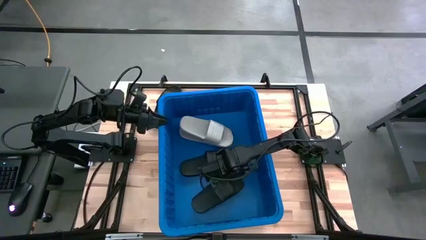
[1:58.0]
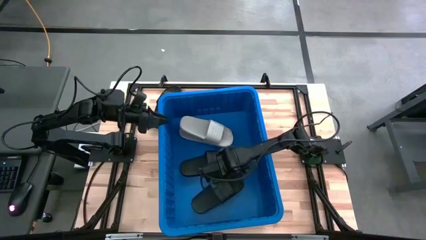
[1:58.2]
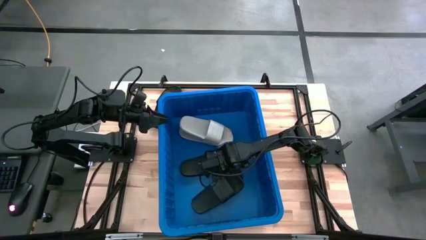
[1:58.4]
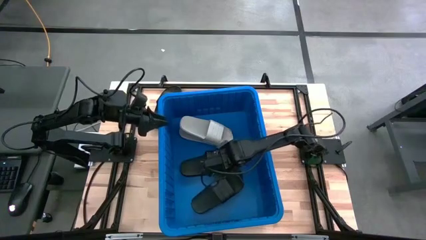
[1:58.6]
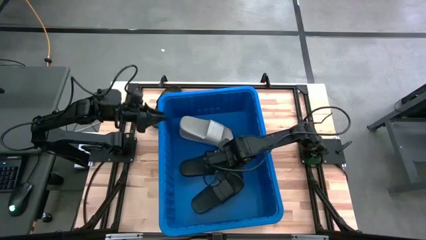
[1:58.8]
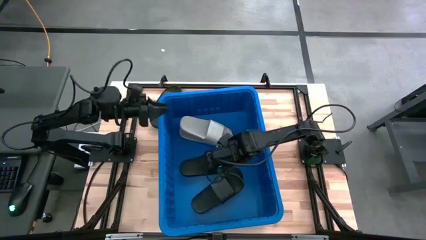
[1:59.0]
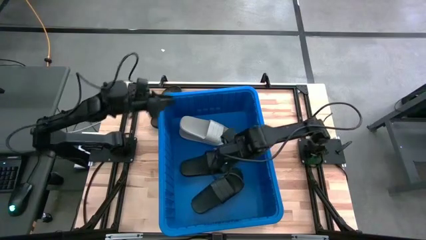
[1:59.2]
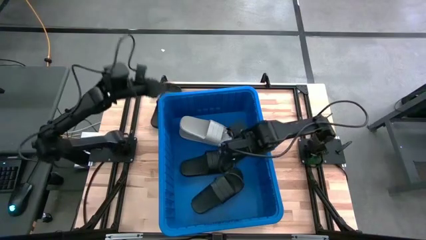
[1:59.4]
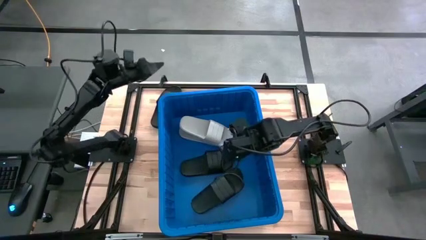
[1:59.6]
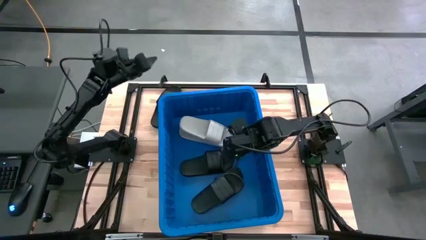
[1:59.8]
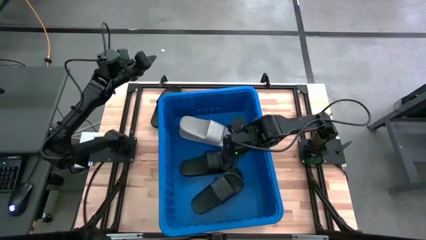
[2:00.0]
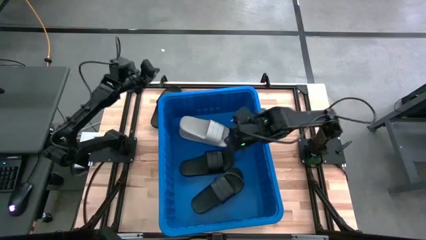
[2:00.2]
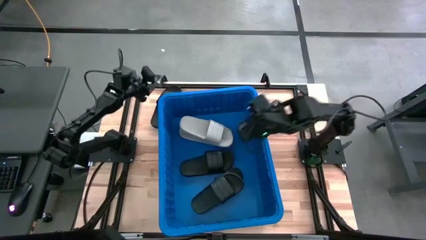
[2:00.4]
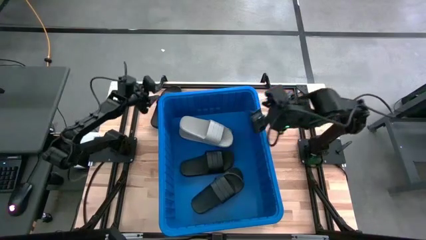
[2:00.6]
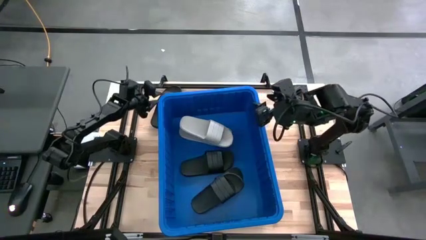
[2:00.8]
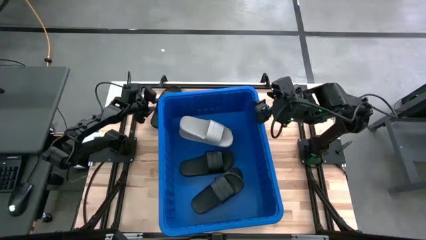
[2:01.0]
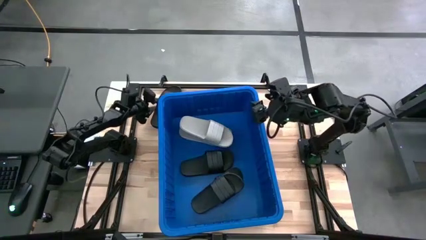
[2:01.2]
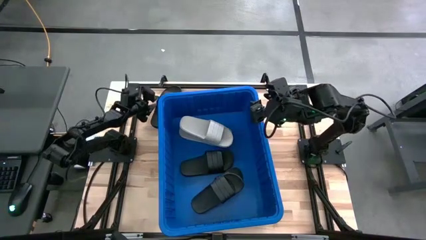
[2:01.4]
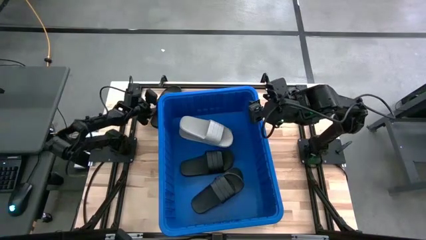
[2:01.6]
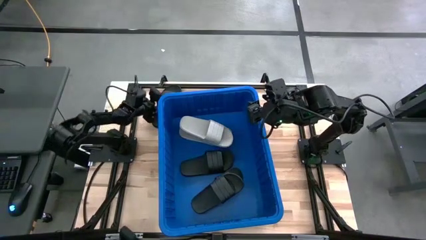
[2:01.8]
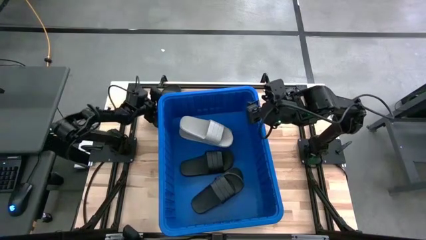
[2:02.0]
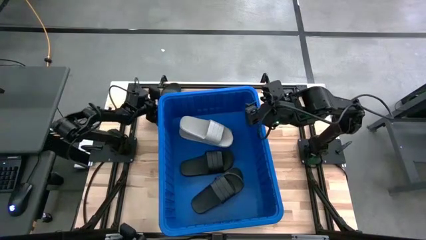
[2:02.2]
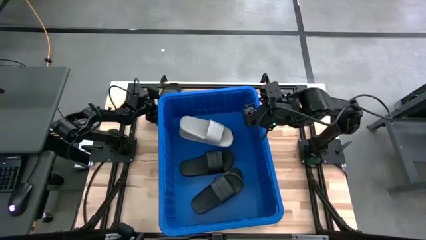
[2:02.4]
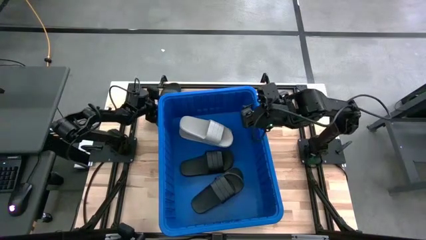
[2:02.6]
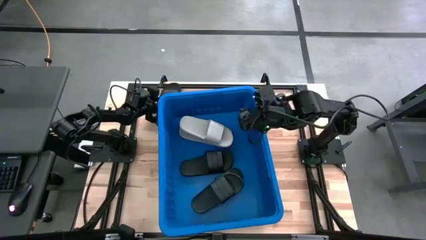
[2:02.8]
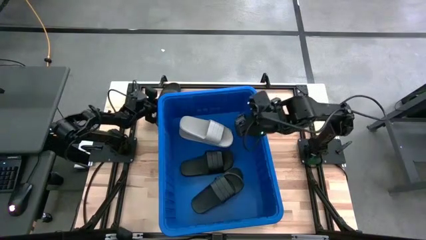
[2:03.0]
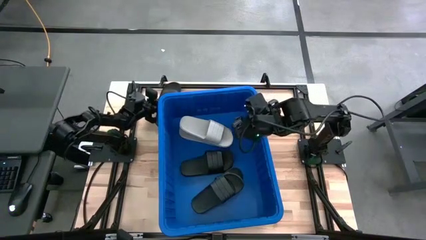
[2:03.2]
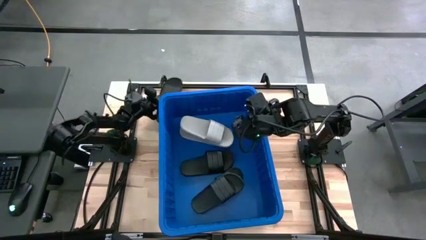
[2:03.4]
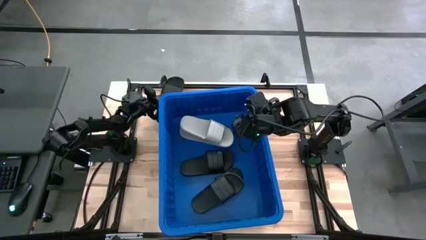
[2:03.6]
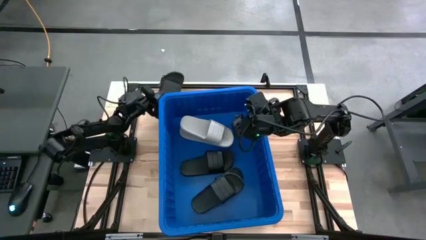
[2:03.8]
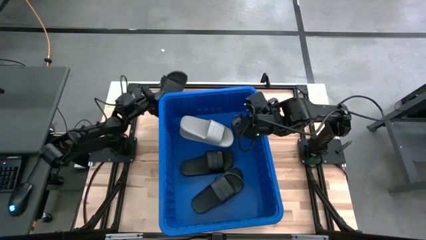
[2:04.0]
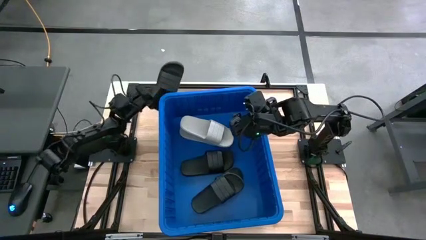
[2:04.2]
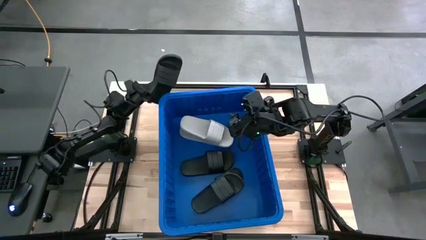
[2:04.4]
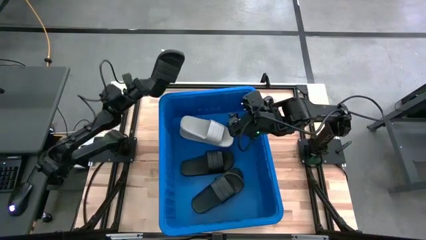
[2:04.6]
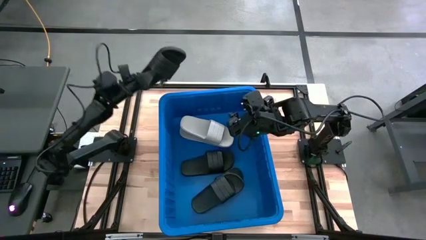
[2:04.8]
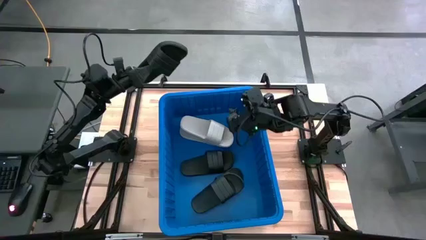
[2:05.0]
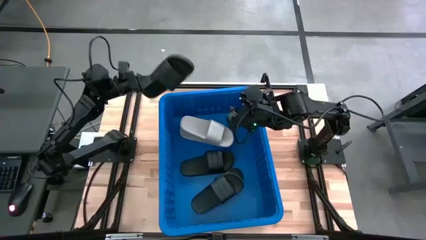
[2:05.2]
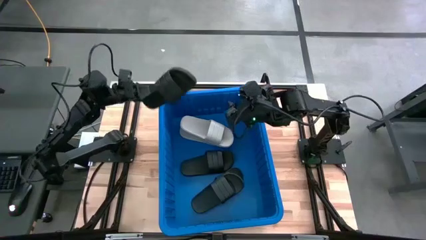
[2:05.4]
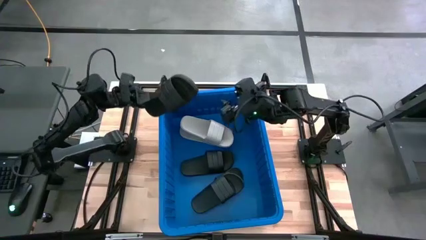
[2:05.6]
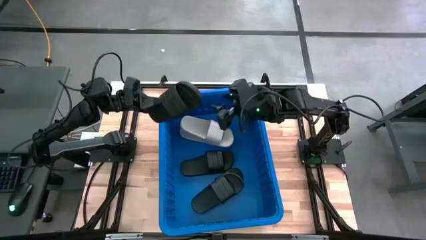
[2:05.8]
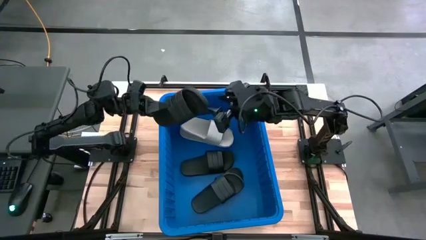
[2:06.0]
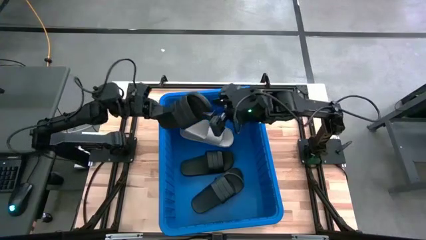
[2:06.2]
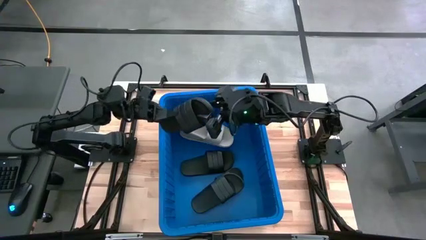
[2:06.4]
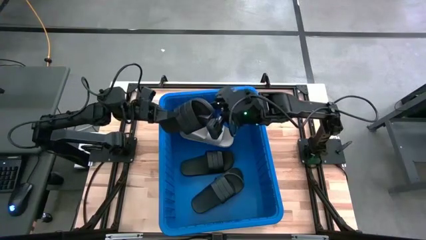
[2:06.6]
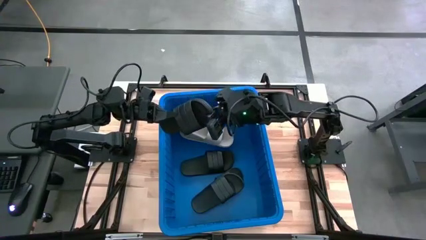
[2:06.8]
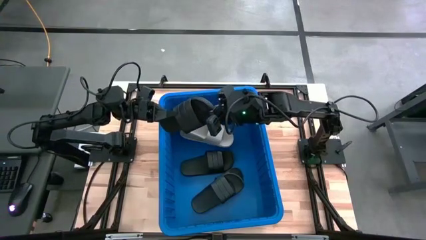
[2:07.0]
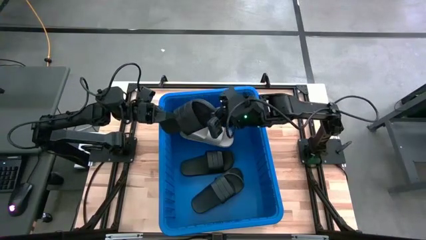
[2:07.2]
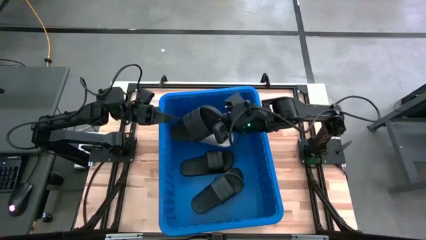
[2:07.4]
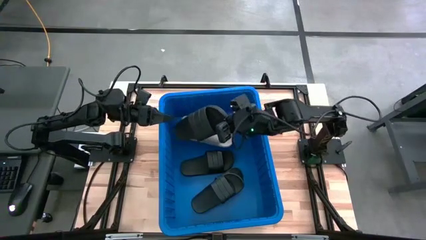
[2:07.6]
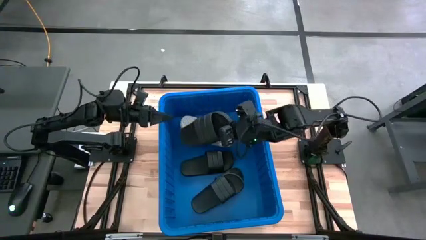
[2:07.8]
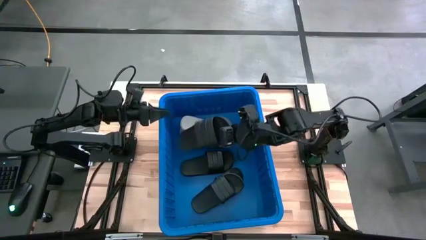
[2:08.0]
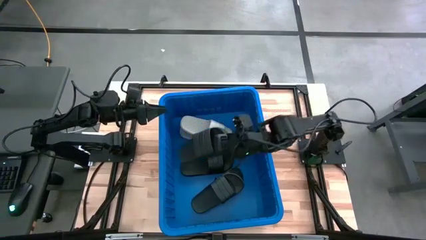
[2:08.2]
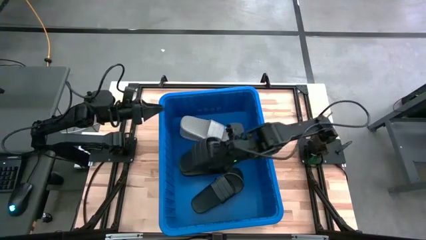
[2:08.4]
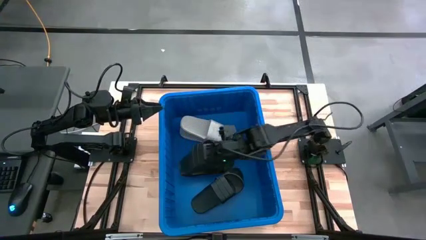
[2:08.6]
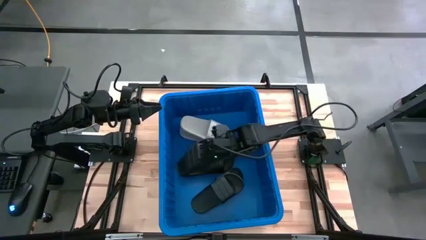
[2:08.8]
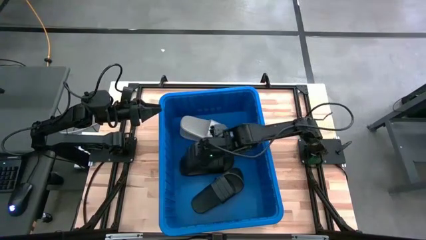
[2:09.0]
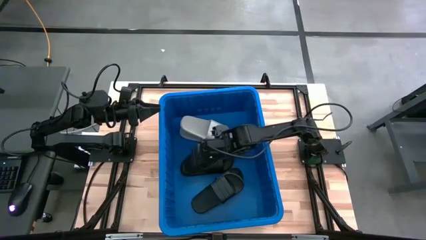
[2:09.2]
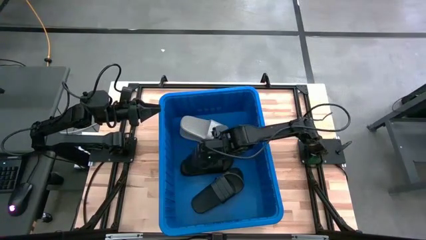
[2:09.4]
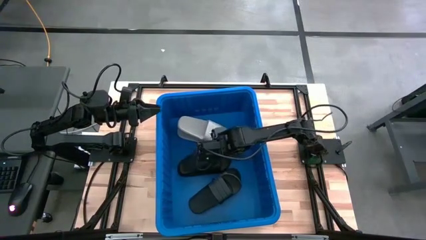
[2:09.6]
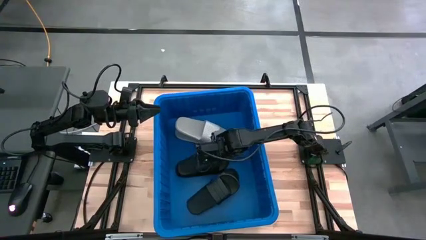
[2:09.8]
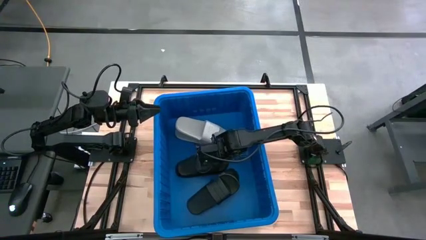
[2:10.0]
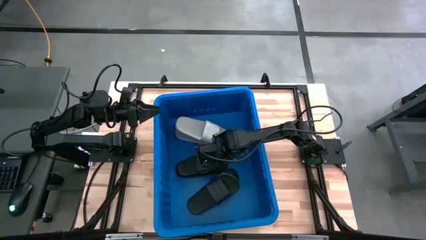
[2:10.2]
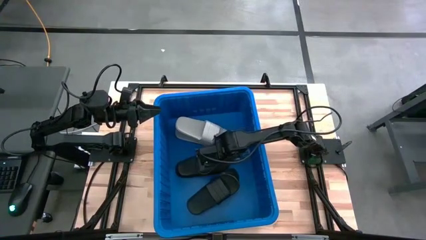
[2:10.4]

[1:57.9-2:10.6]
Task: Pick and place slides into bin
Stack the black slide on top of the black slide in the blue bin
